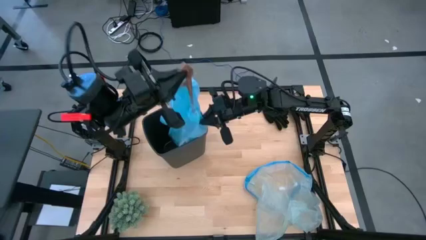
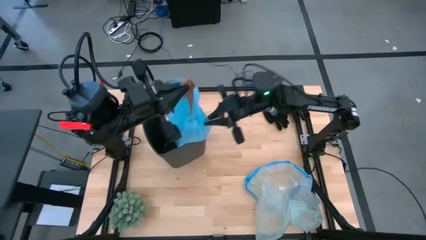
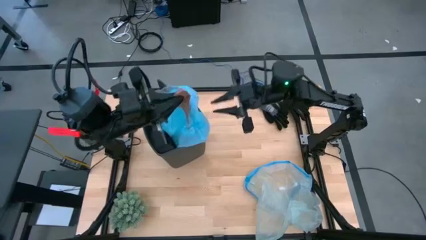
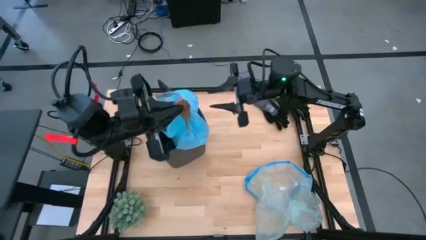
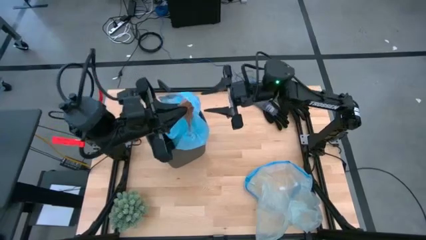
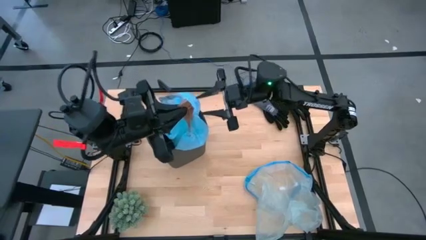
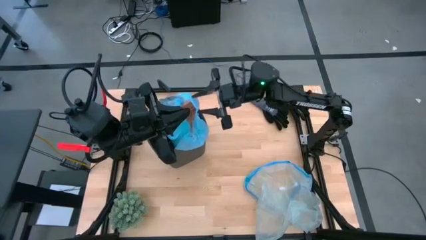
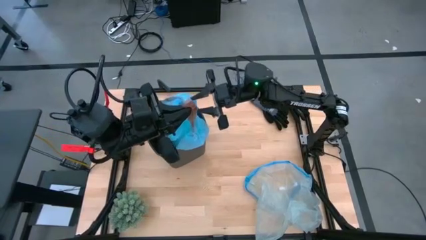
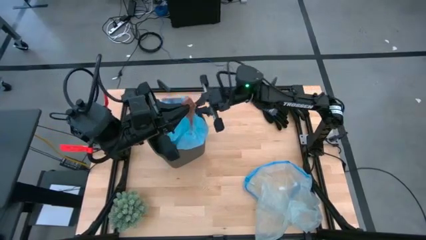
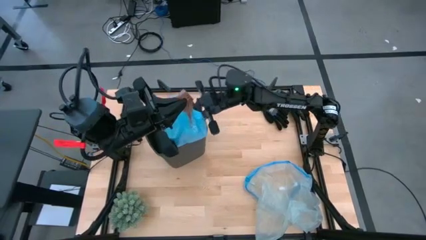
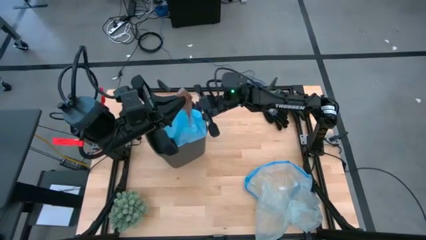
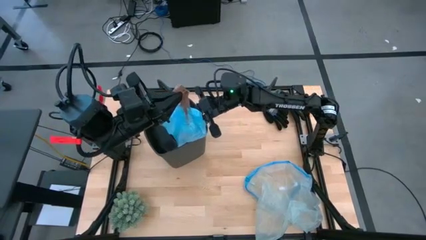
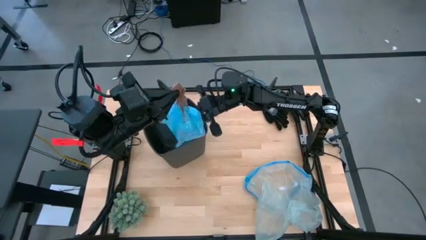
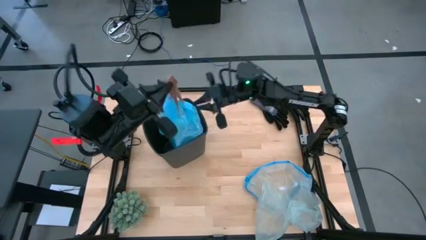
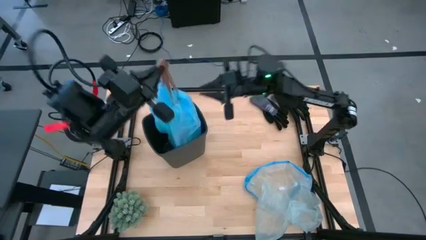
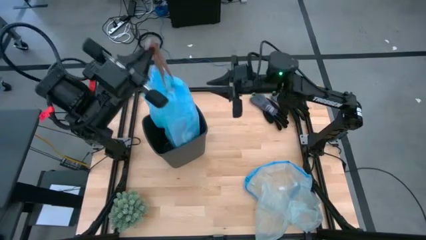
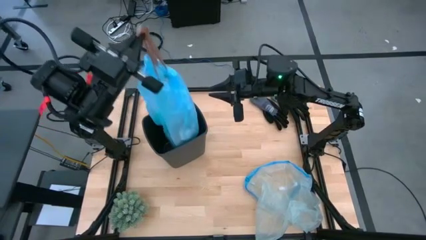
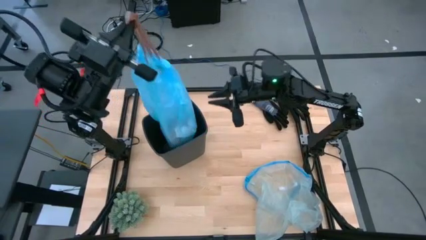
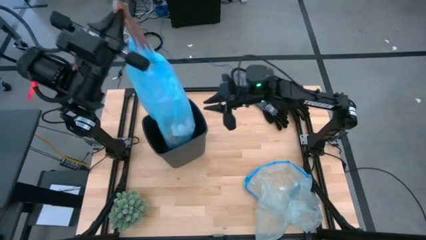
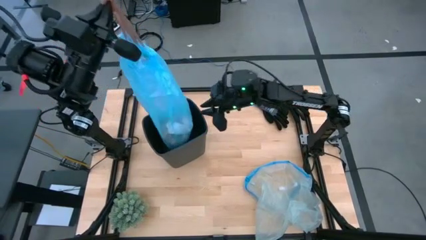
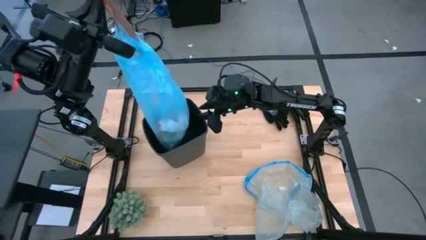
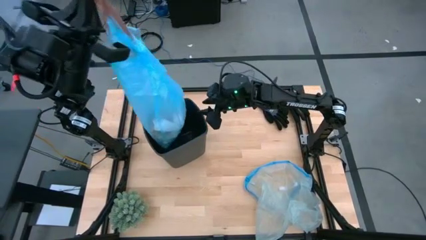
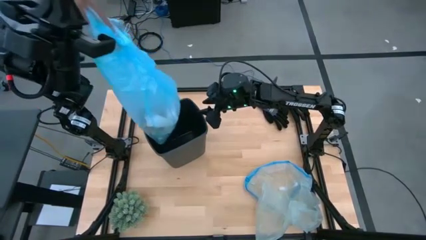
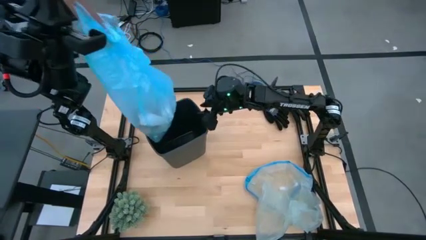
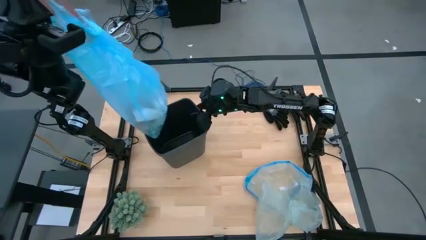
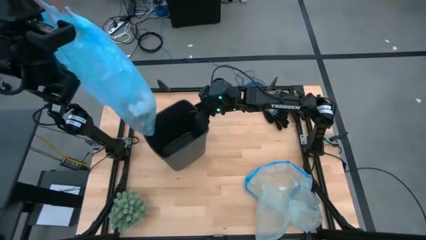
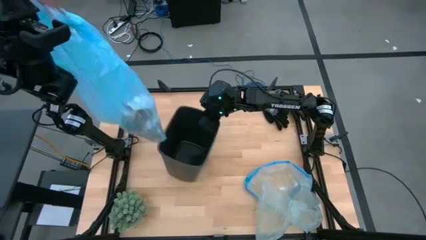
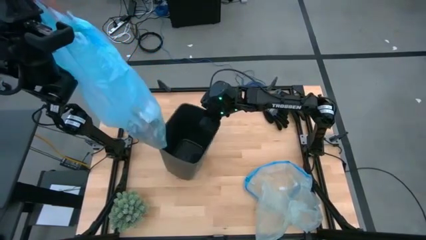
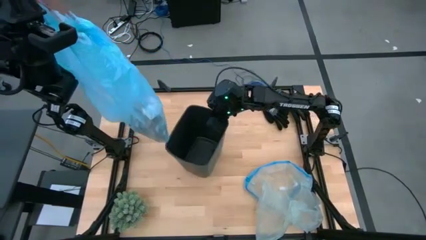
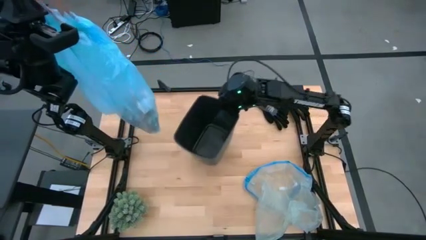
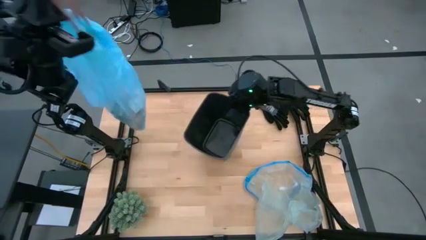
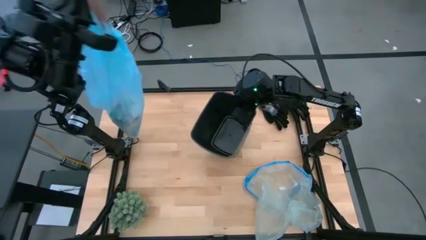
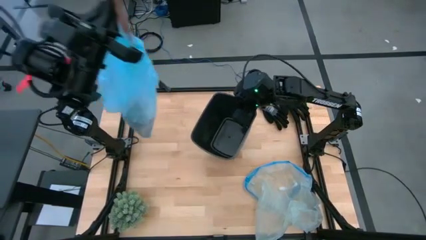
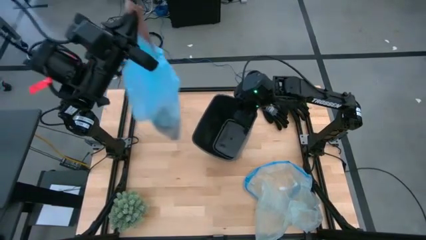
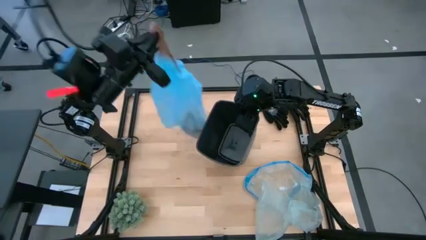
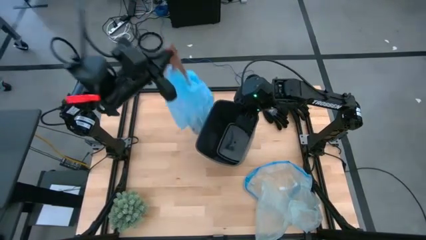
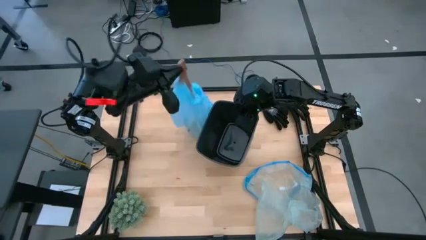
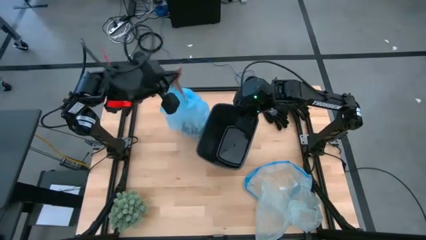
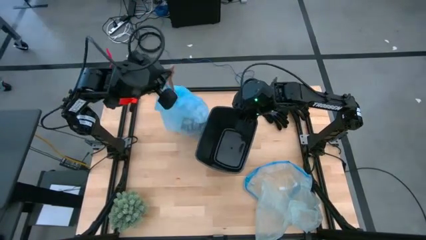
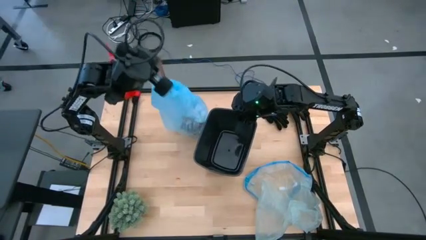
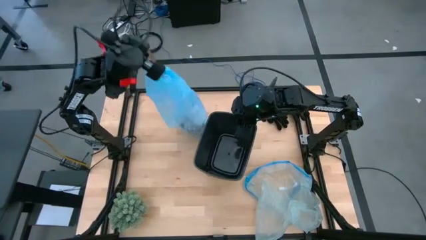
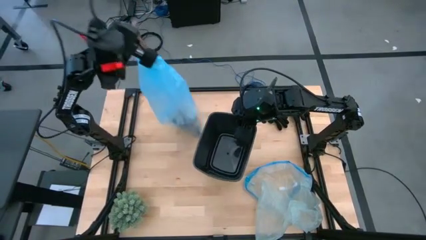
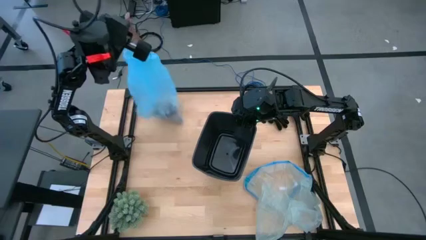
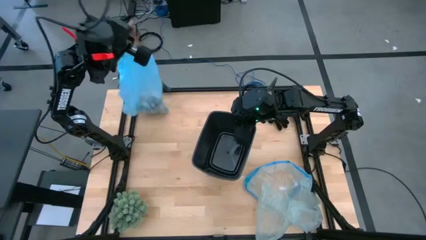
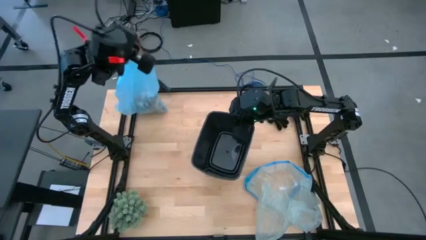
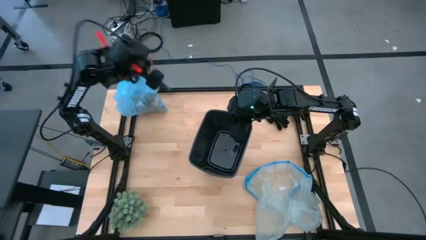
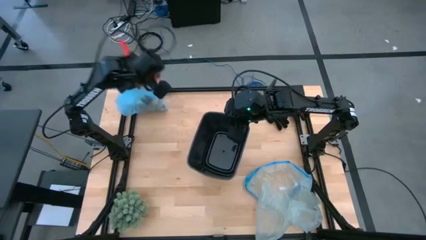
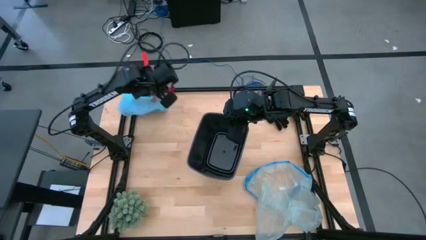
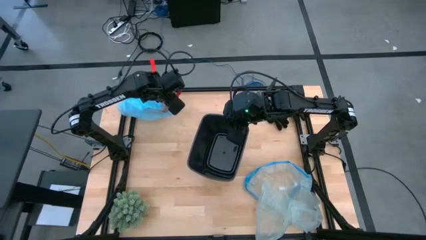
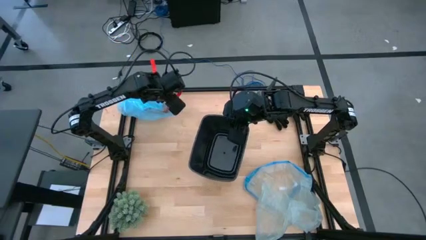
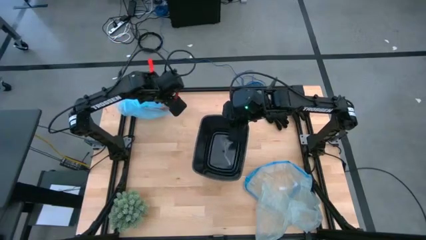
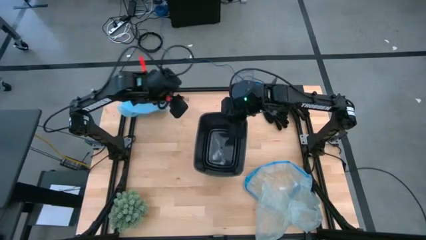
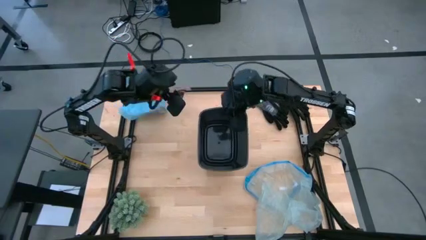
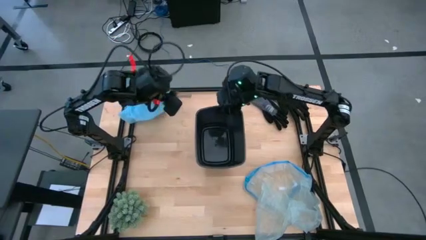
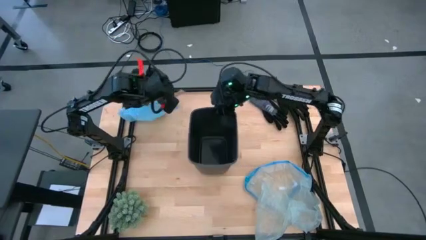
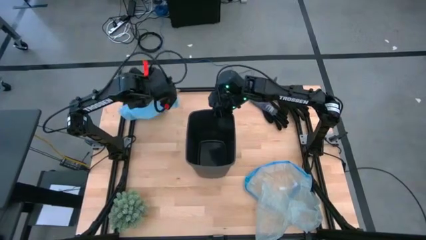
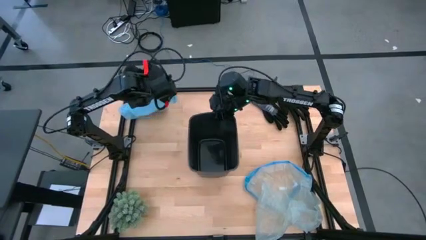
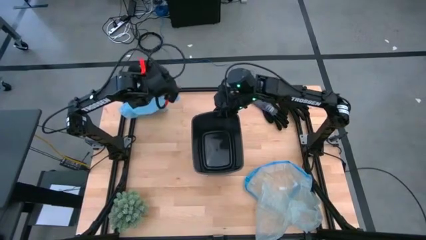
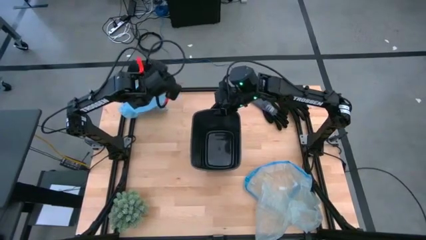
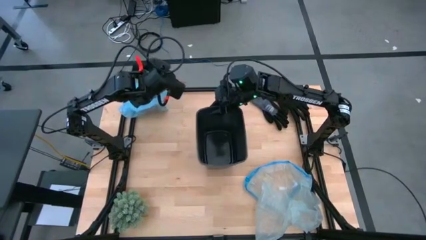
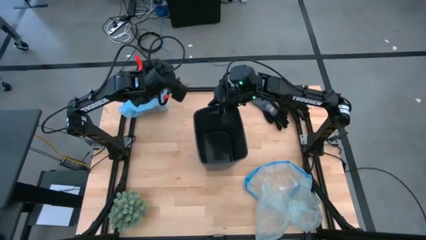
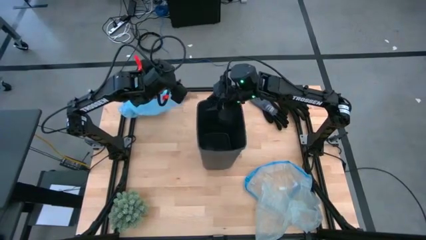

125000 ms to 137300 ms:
Task: place trash/remove bag and relplace
Remove the trash bag from the bin

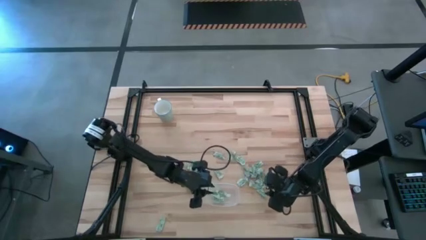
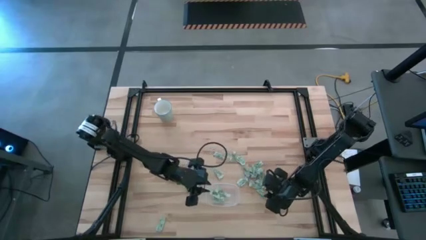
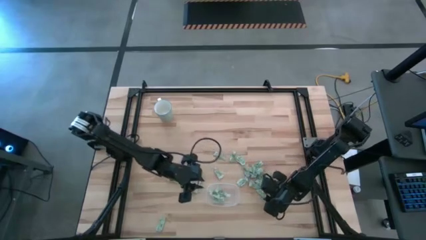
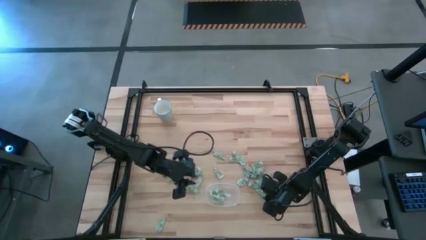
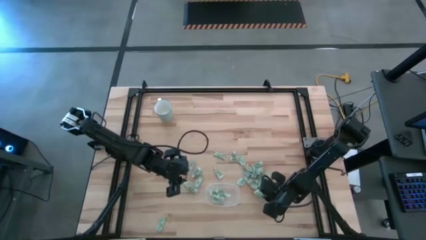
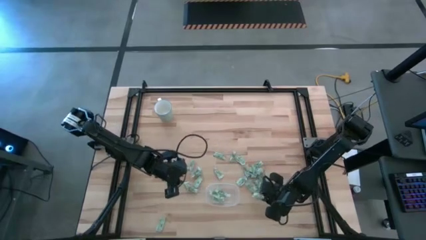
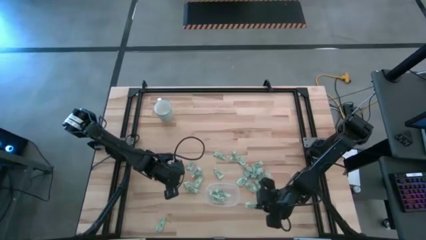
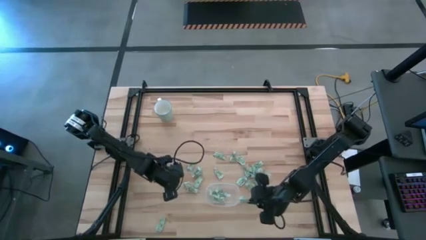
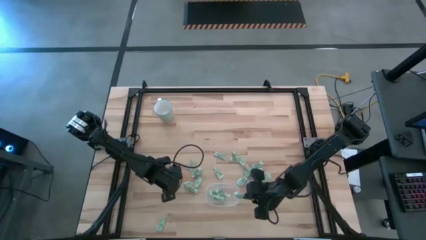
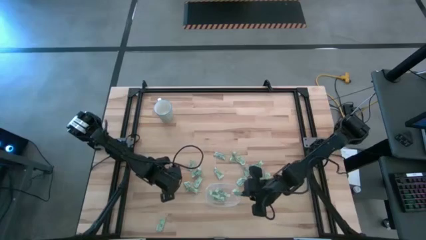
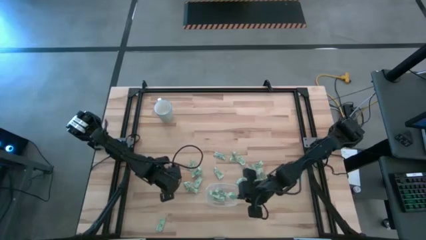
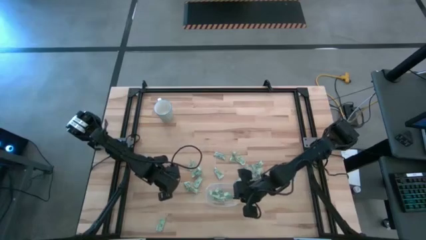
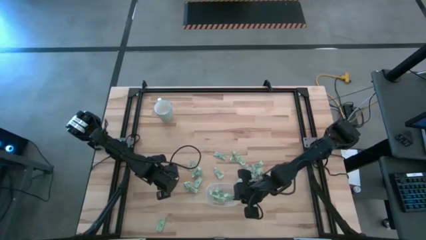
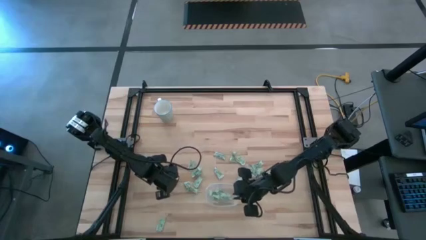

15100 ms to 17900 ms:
Task: Pick and place Stevia / Truvia into bins
Put the stevia packet into the transparent container

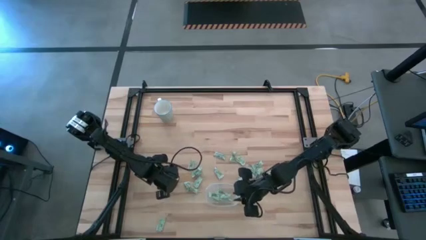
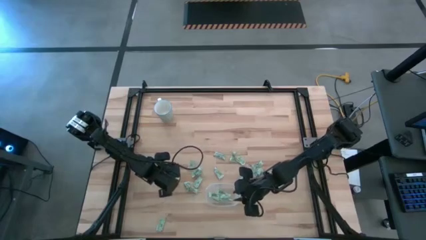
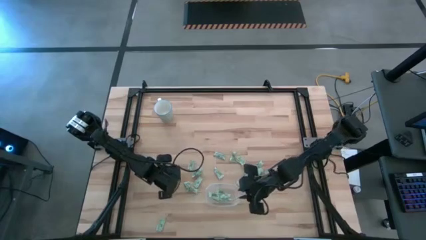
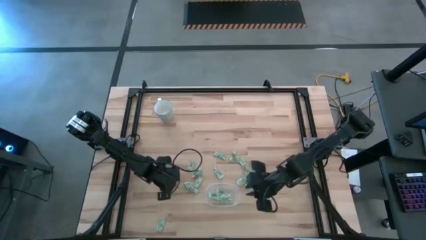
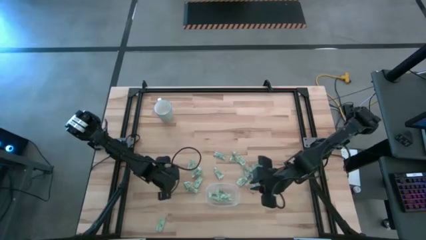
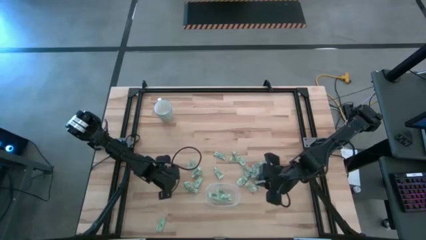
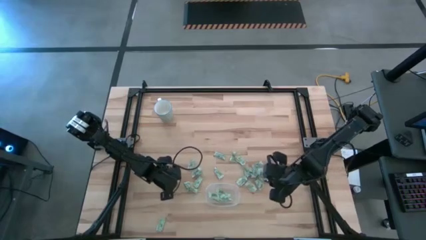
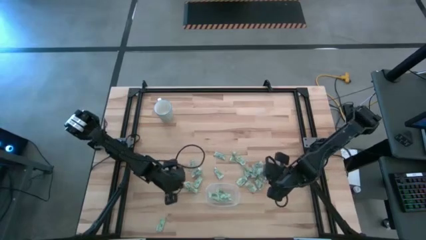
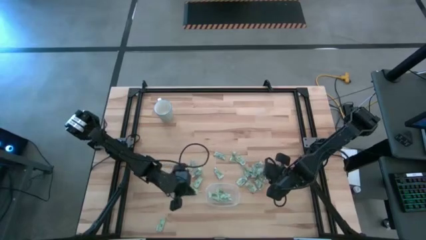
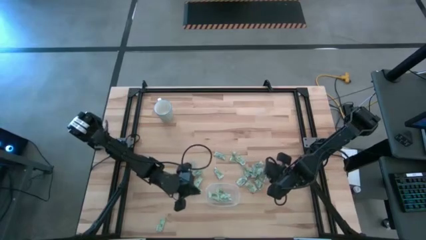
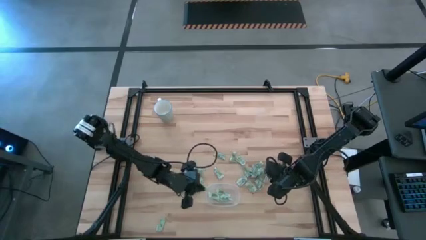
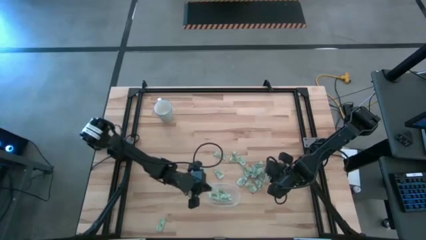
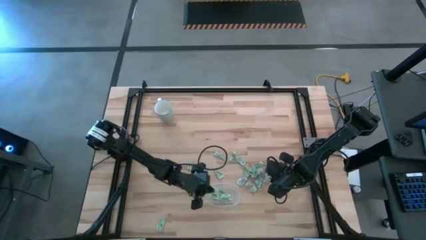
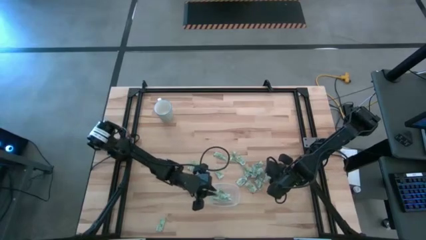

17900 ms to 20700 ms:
Put the stevia packet into the transparent container
